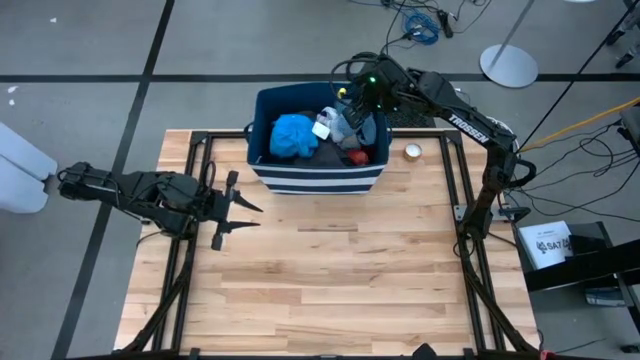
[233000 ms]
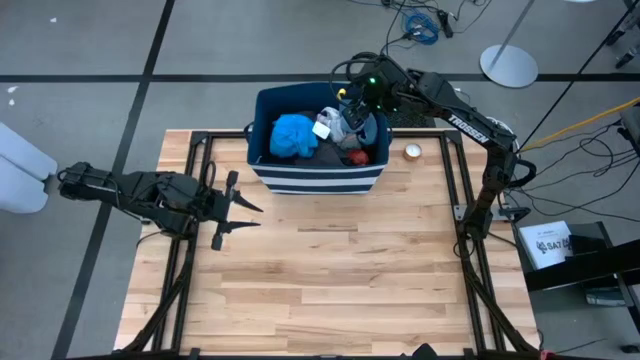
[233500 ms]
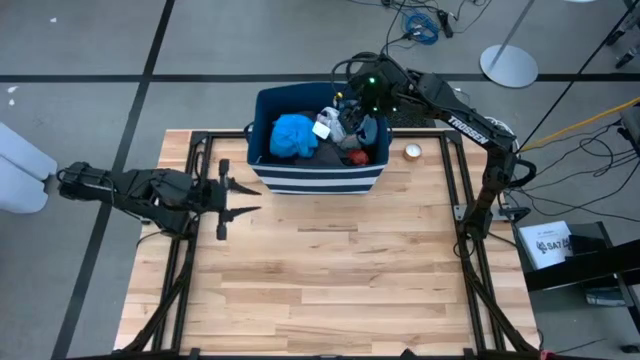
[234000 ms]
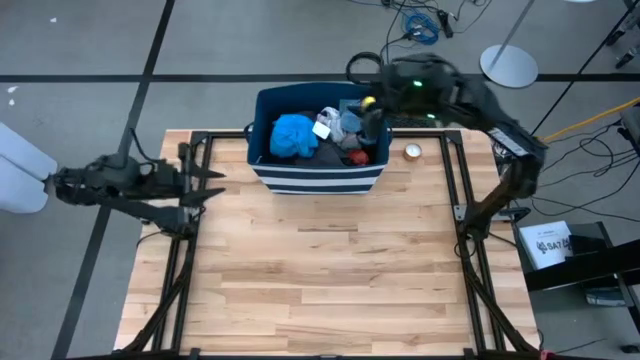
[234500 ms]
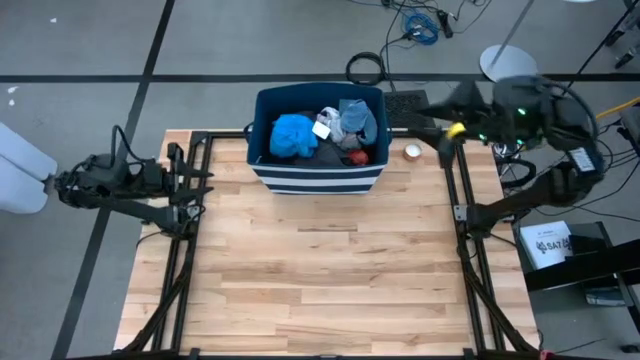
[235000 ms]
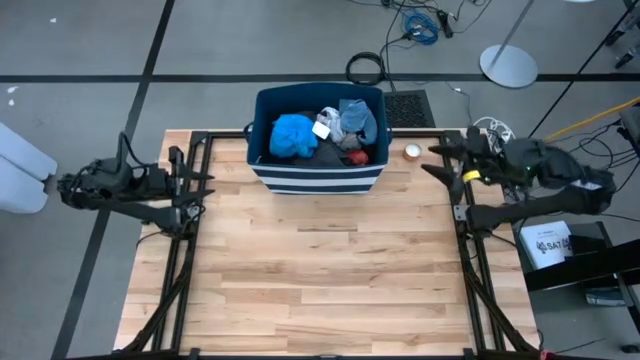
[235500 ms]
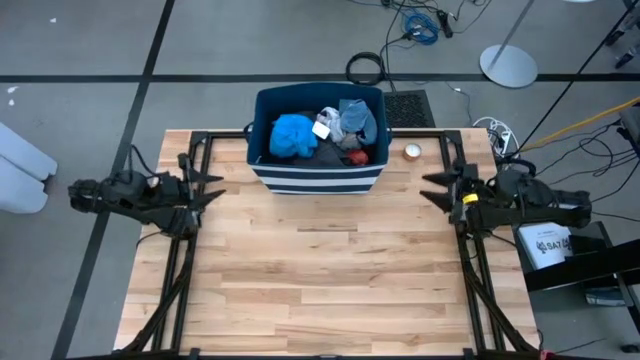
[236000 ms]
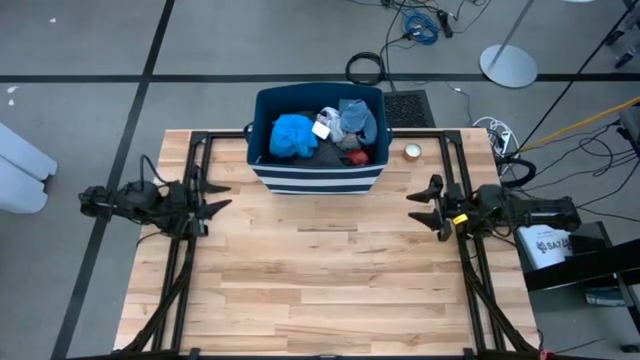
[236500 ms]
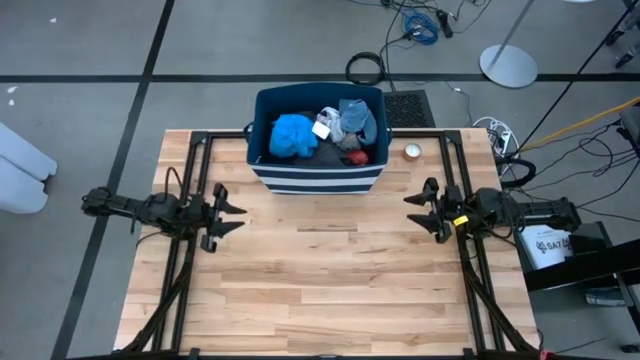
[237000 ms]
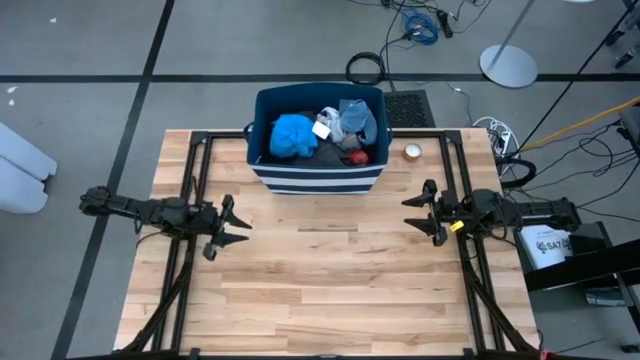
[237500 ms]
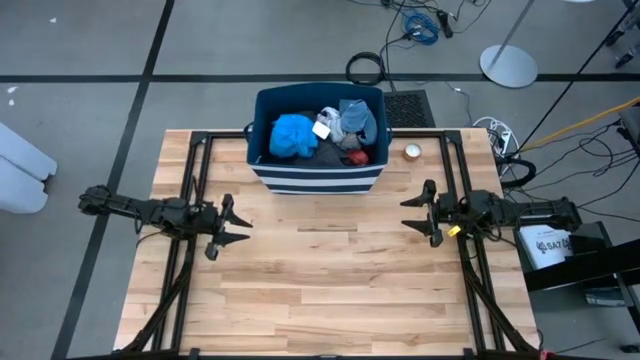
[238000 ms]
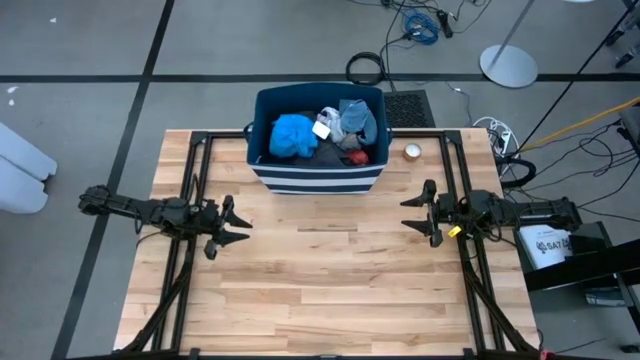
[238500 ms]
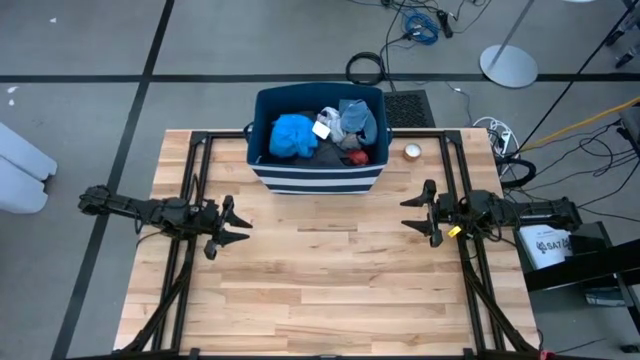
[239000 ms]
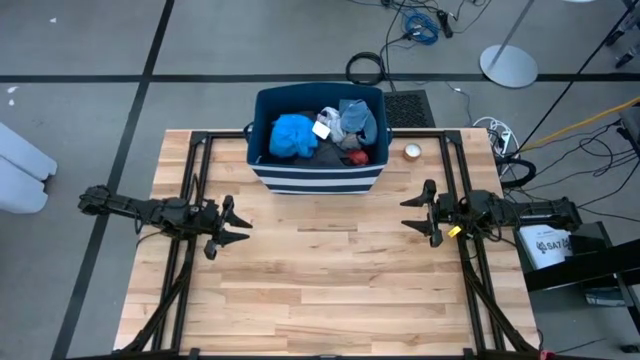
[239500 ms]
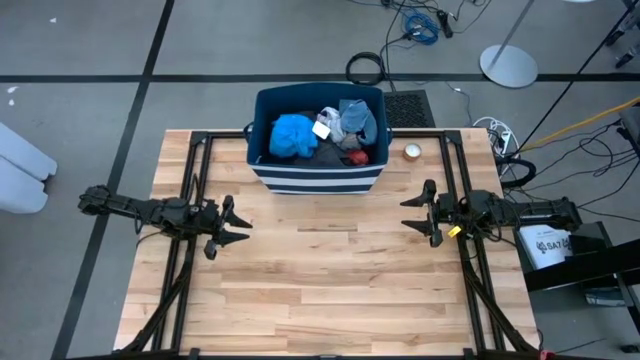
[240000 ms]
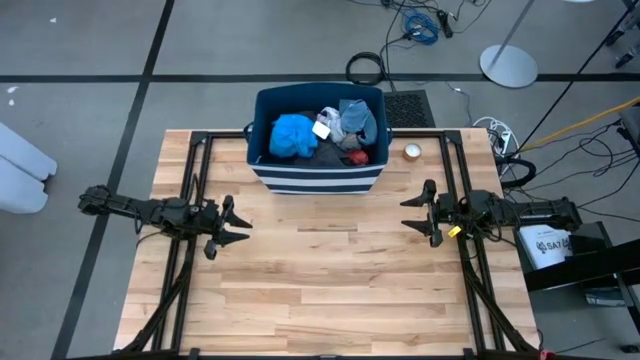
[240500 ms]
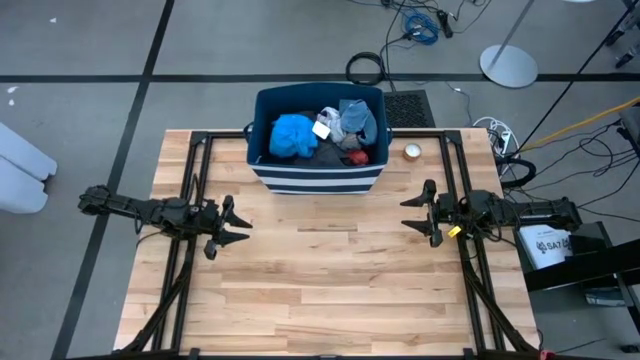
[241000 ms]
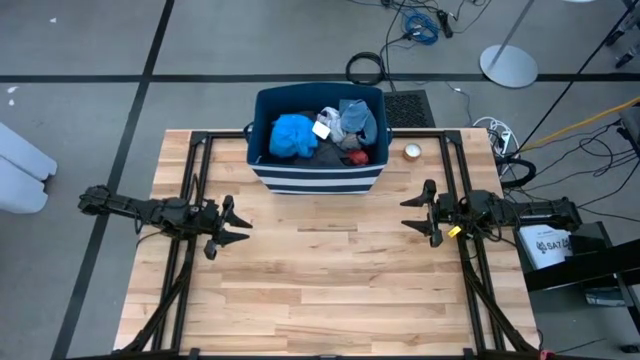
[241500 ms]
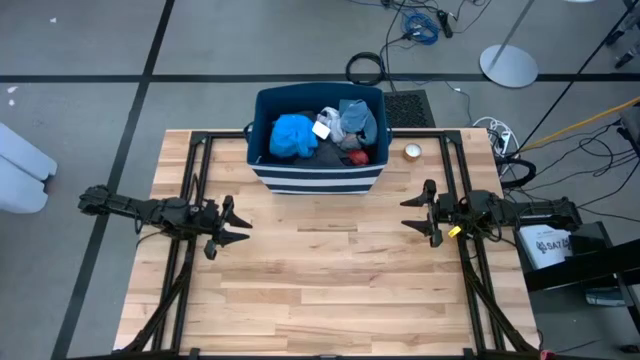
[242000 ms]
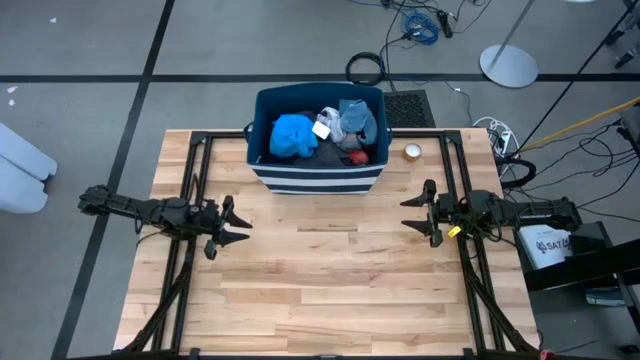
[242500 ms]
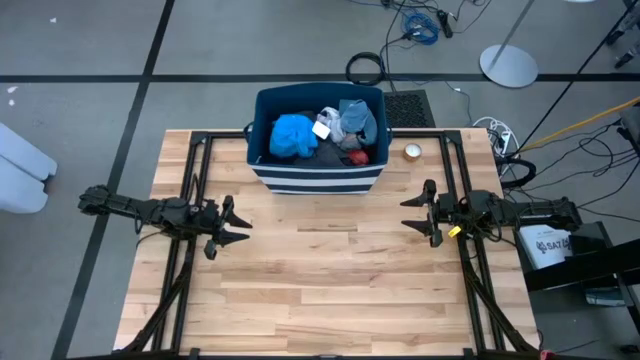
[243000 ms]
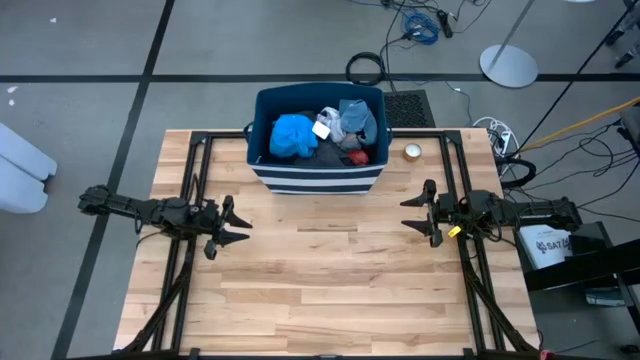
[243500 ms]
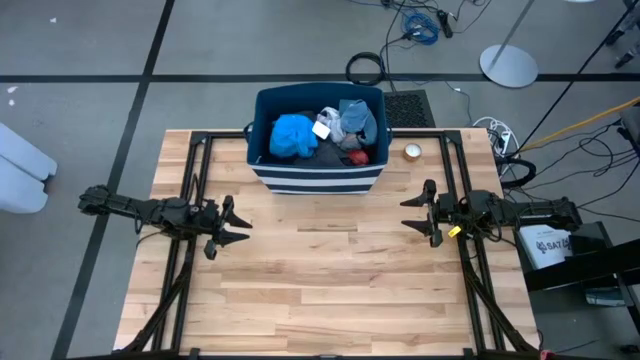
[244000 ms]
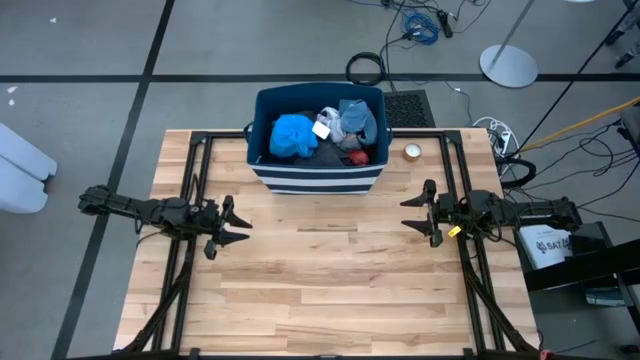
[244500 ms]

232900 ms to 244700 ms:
Task: Sort clothes
Return to Home Position

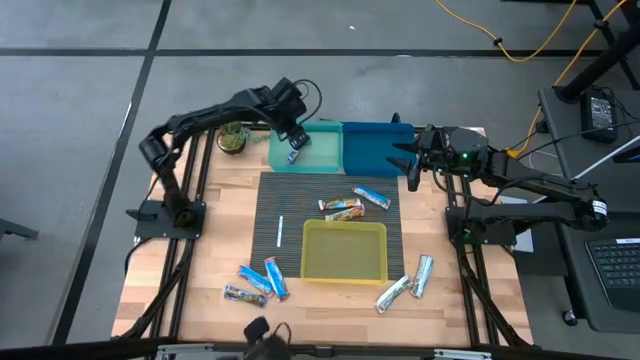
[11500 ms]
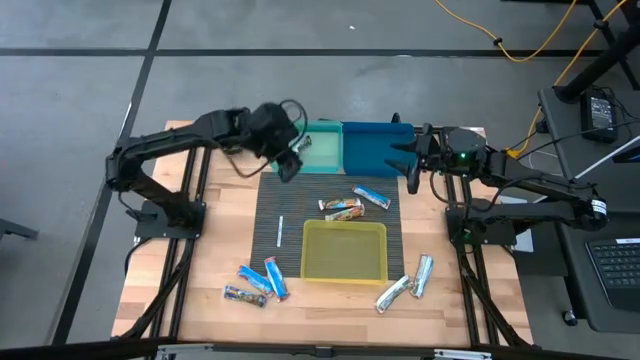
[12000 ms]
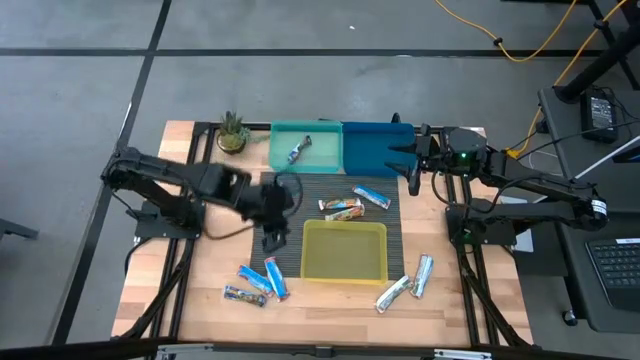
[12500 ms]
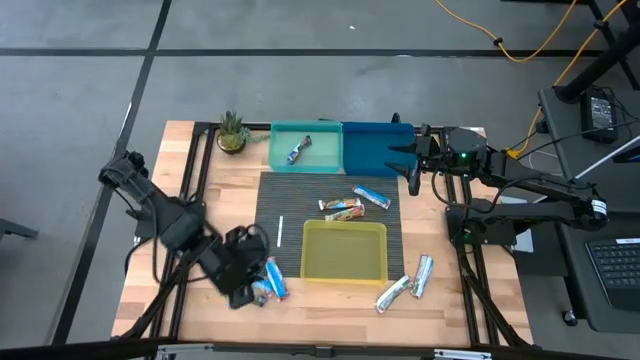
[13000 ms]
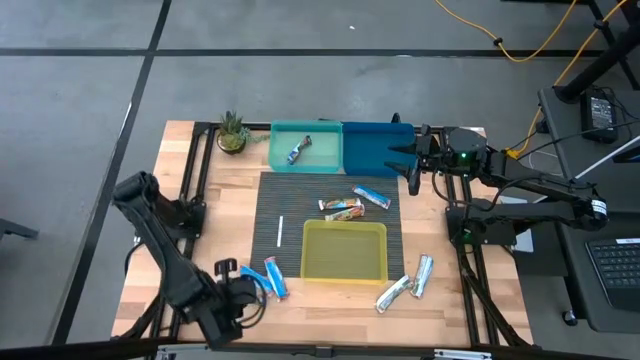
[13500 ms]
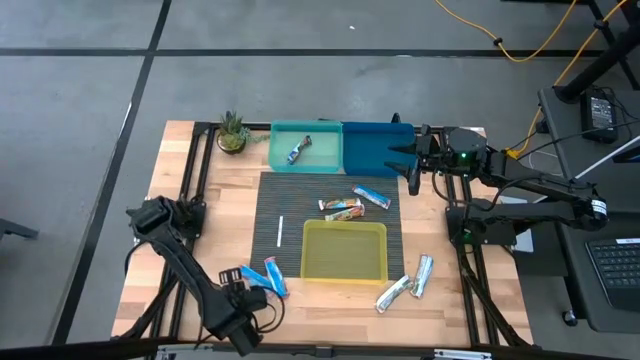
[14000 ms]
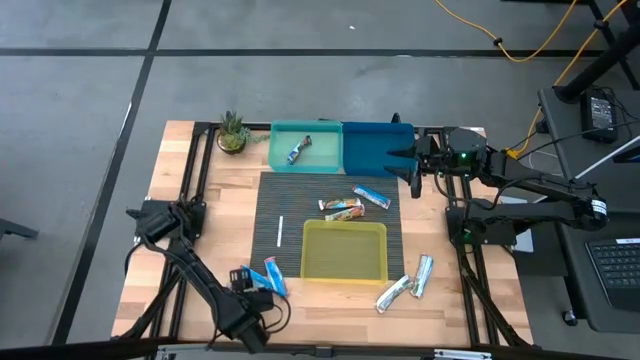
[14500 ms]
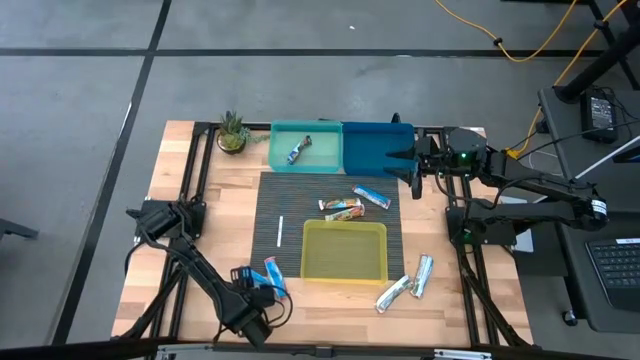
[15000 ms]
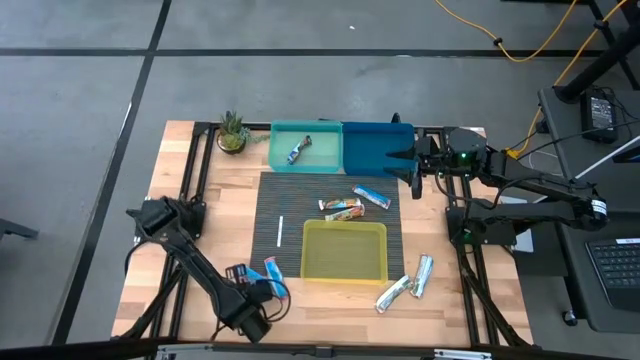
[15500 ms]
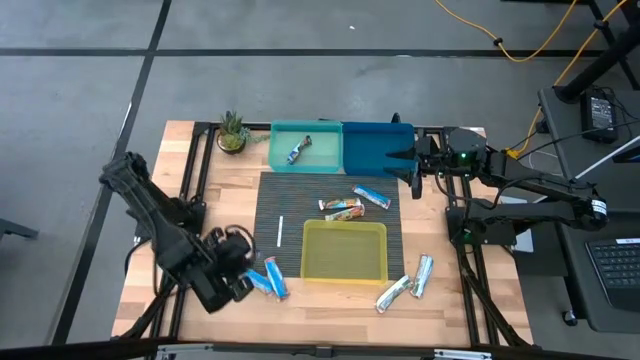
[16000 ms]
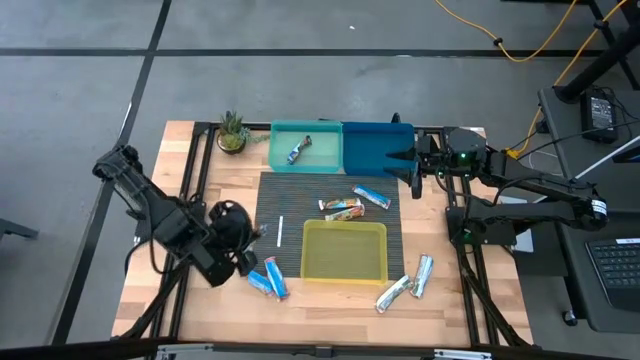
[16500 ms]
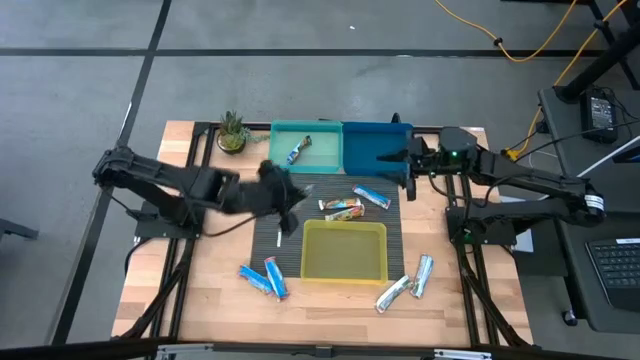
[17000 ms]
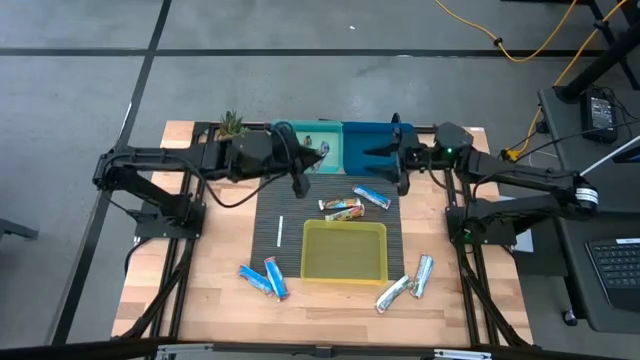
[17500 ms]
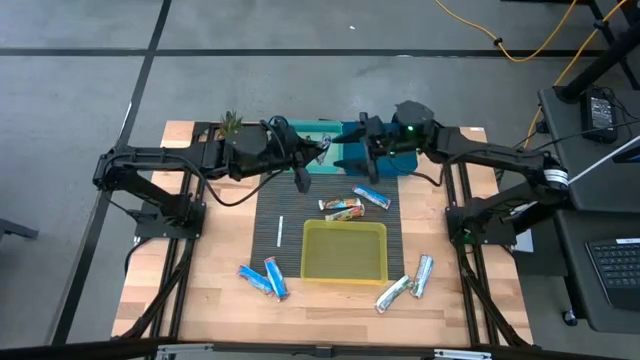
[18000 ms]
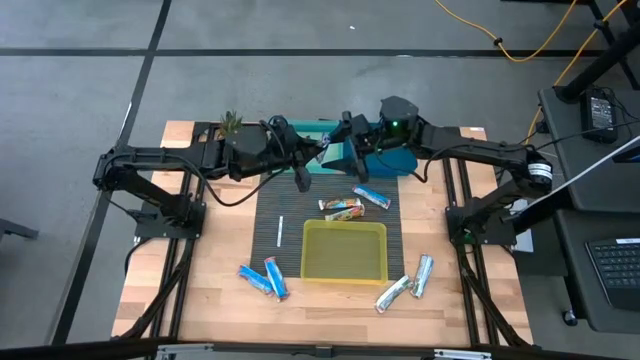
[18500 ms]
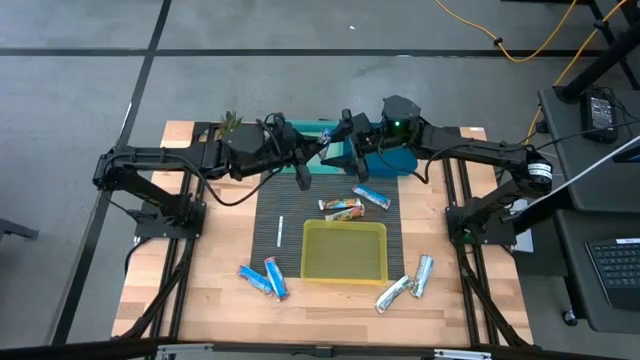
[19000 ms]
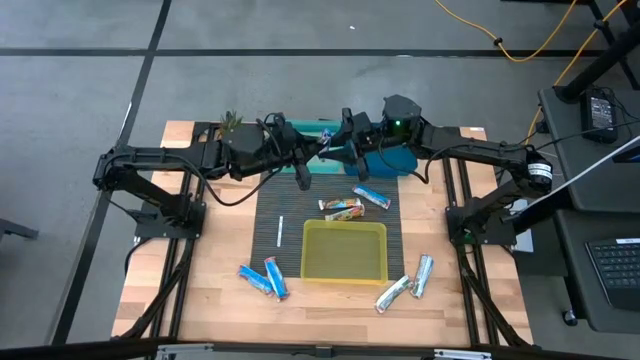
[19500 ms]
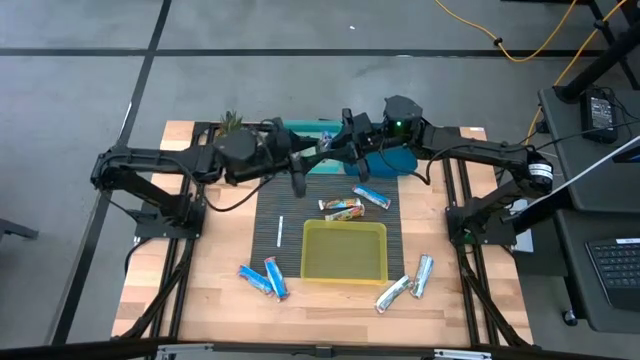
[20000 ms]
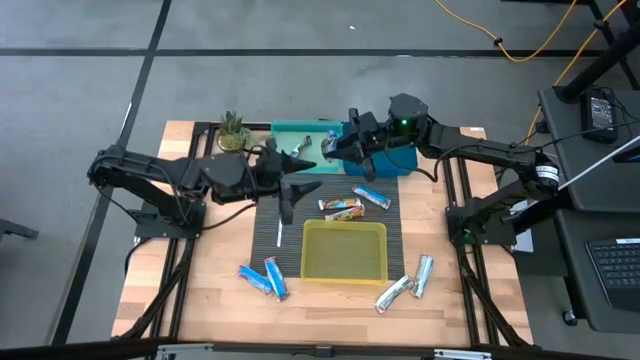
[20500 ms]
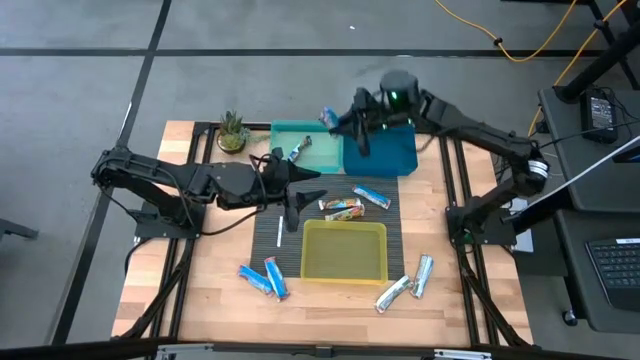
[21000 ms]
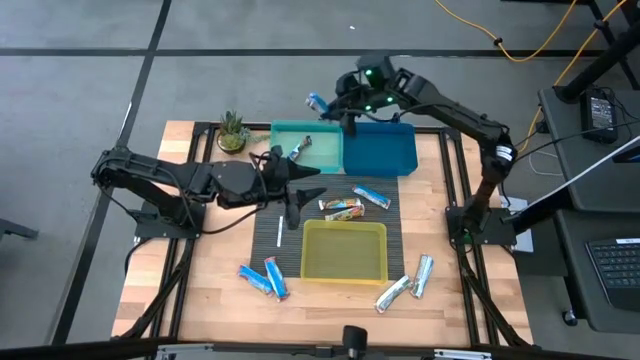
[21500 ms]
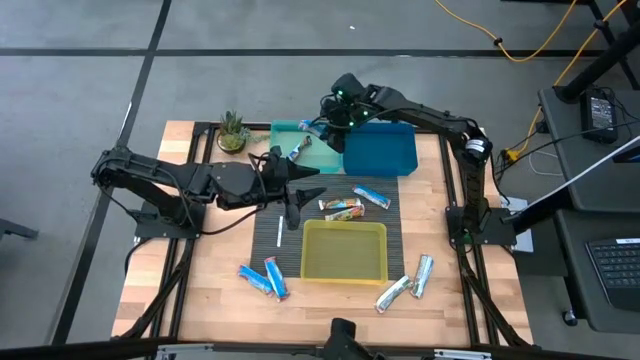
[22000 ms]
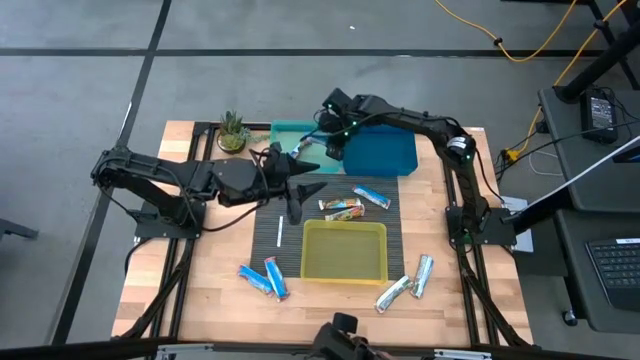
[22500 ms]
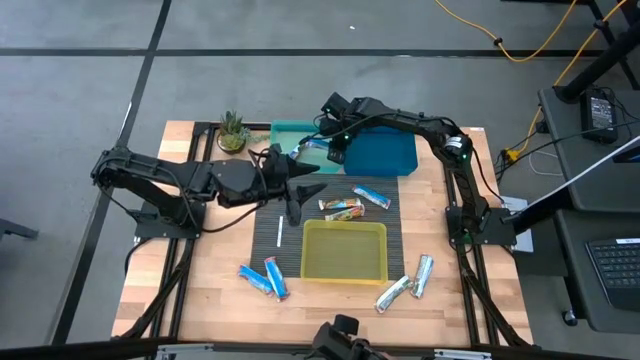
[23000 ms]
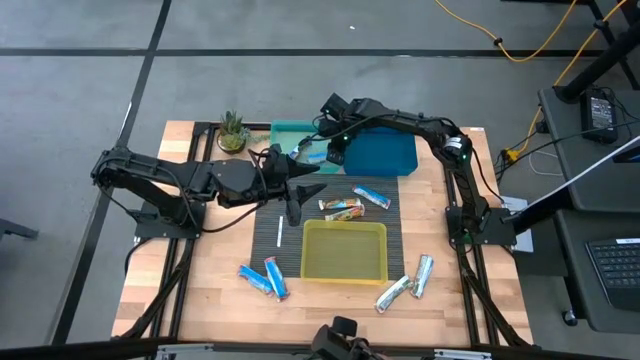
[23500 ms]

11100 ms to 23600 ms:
Task: Pick and place Granola Bars by type
Put the blue granola bar into the green bin
